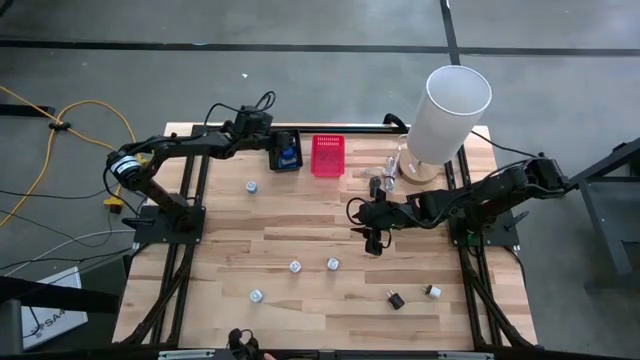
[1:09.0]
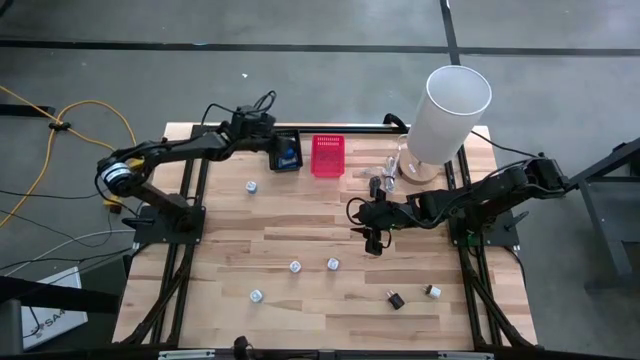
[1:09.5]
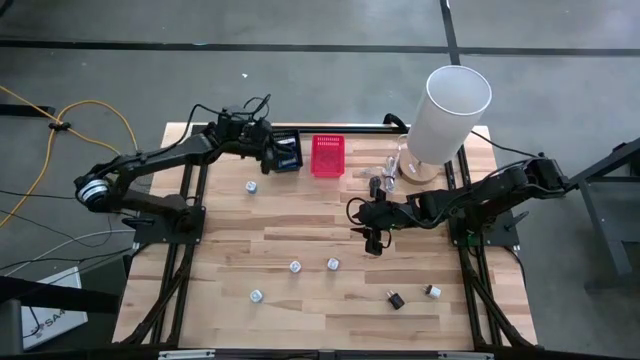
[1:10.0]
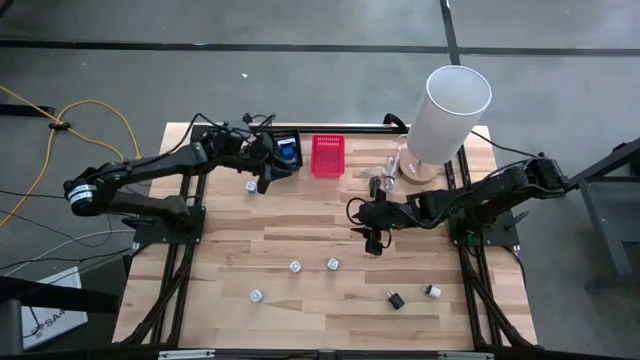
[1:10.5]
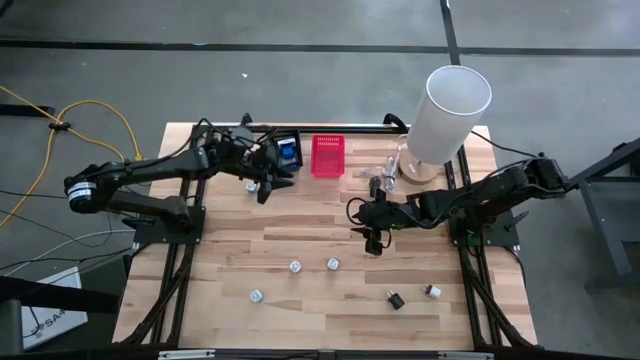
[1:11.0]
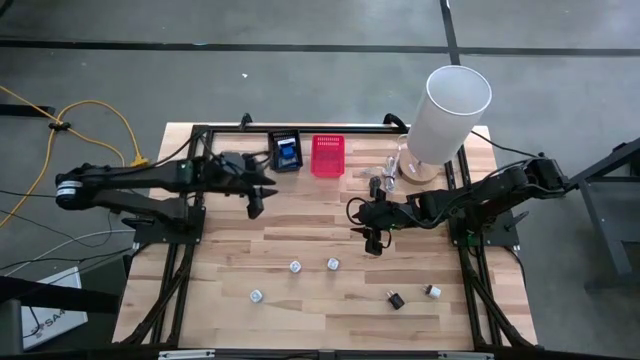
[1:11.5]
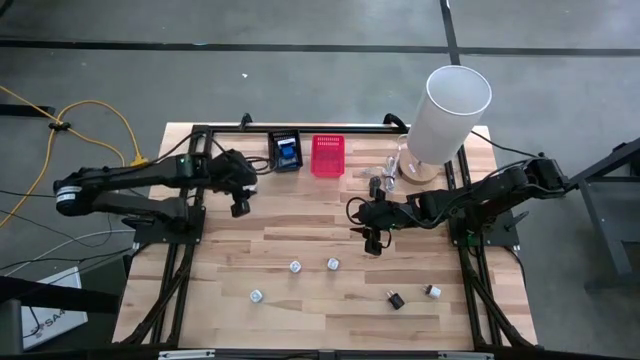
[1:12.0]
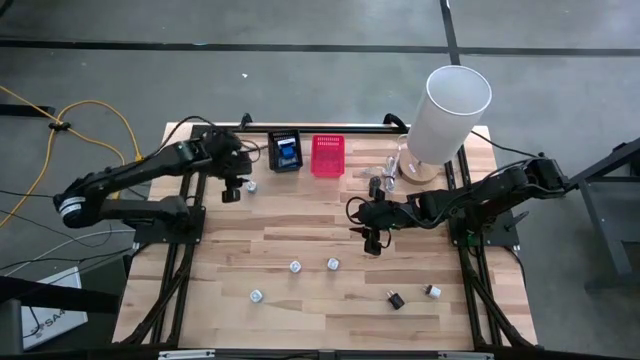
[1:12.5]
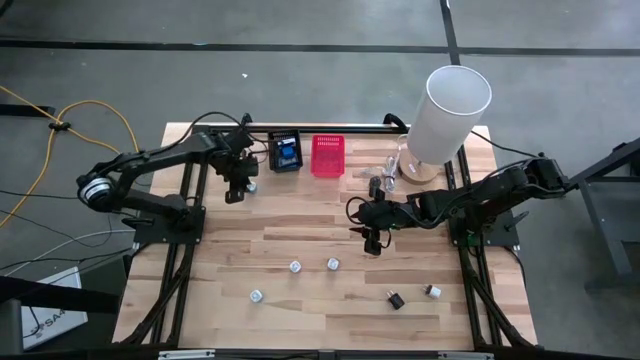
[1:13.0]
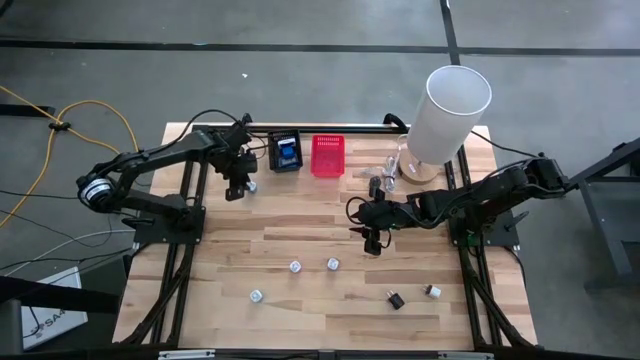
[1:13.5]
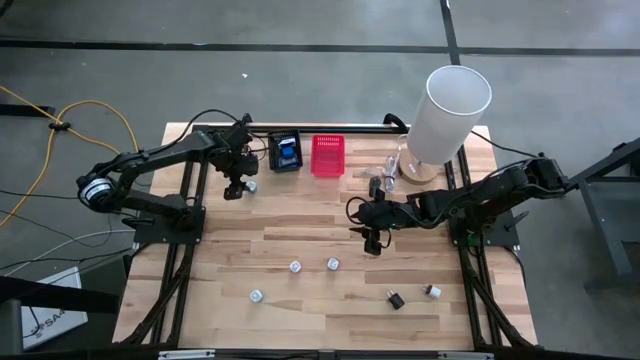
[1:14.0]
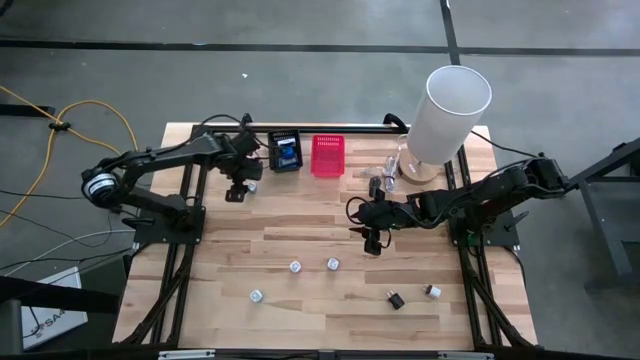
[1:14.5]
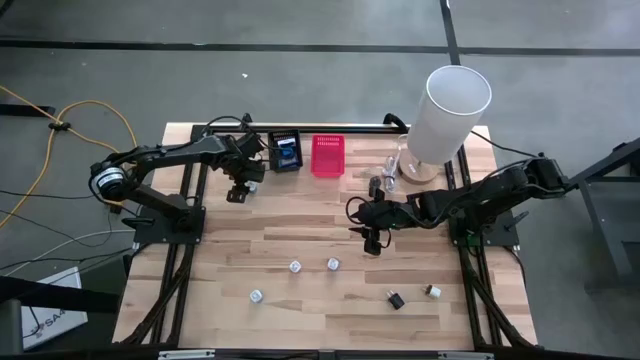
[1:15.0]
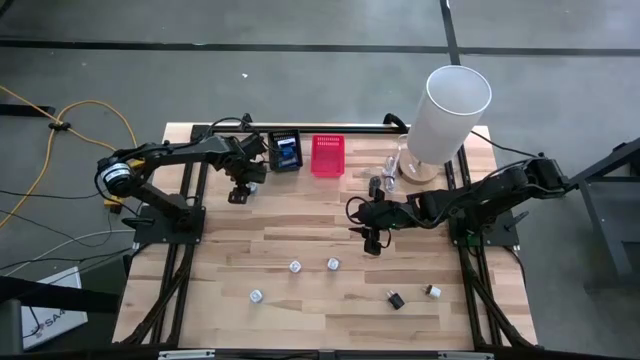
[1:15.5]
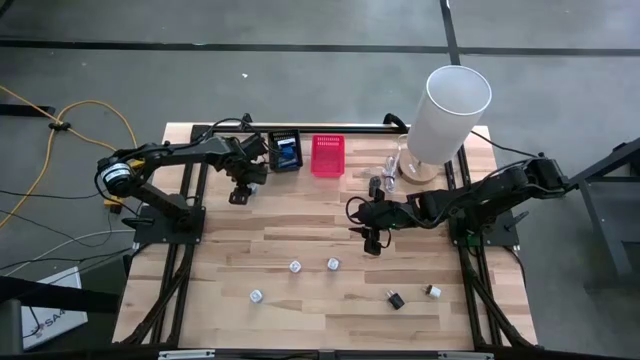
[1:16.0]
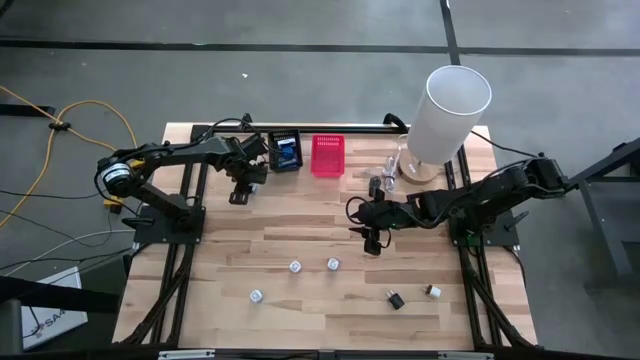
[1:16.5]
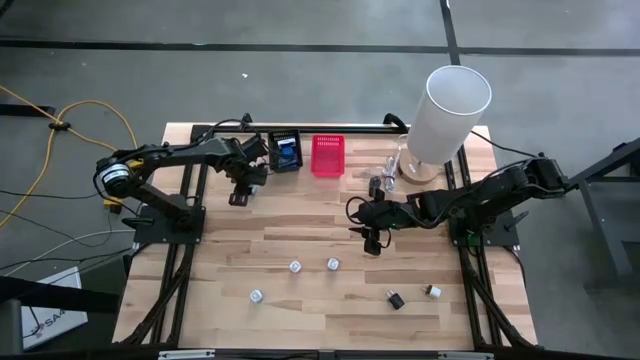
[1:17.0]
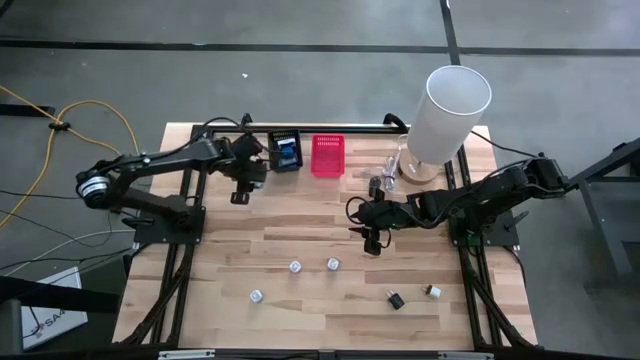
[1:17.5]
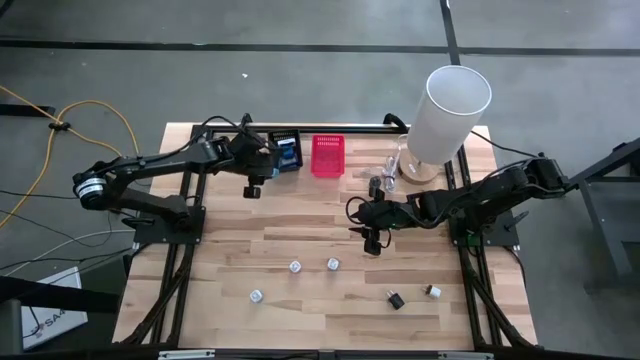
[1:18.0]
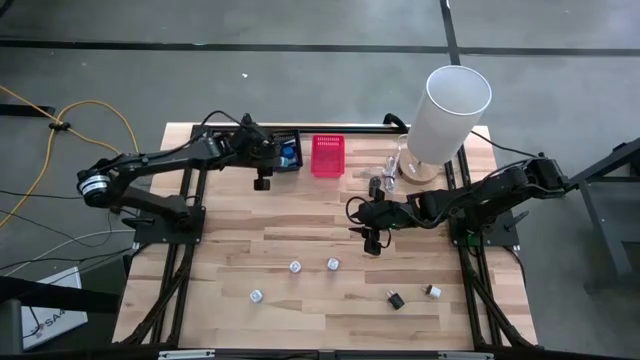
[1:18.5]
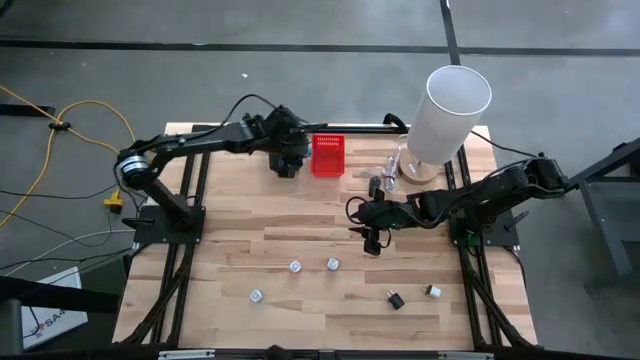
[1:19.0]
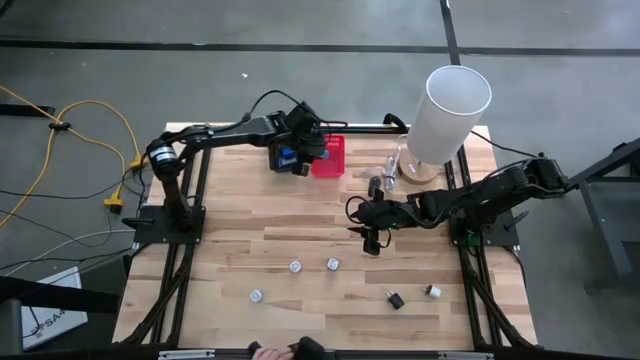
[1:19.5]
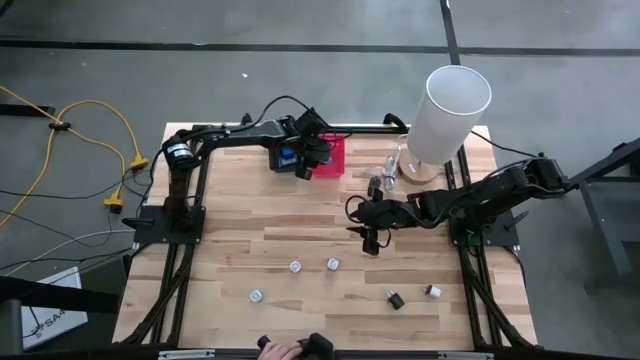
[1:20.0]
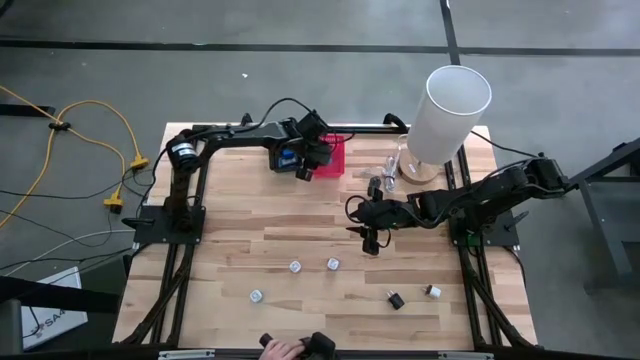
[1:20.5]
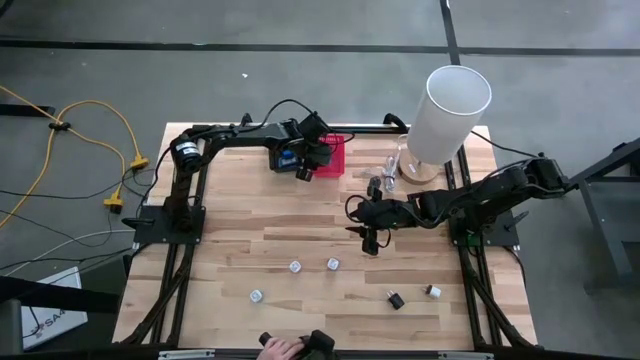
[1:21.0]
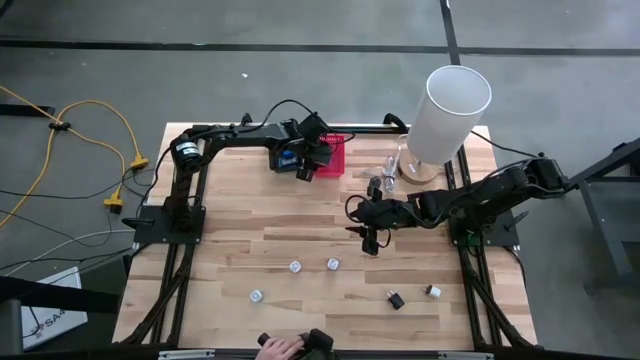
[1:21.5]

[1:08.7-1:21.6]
Task: Pick & Place Office items
Put the top blue charger adapter into the red basket

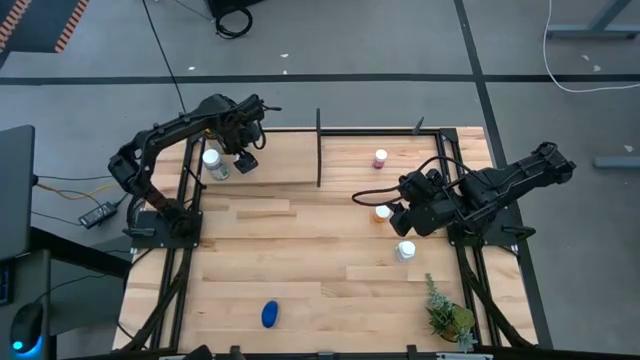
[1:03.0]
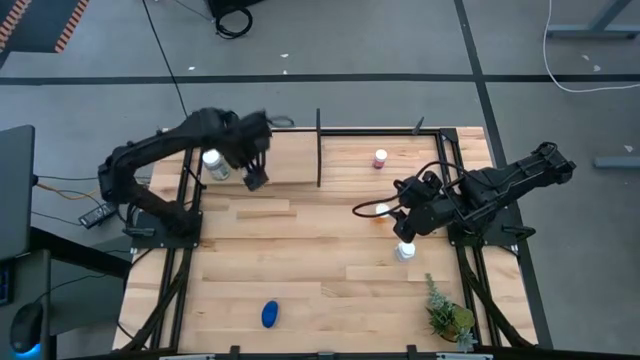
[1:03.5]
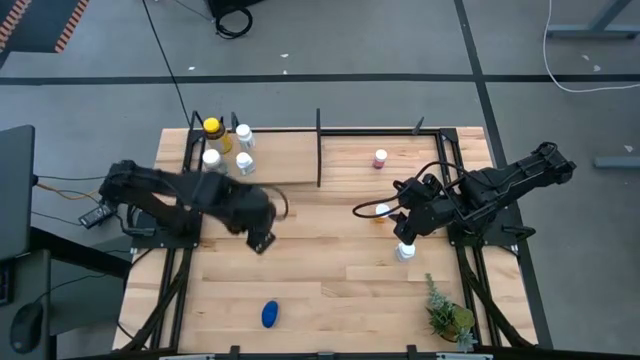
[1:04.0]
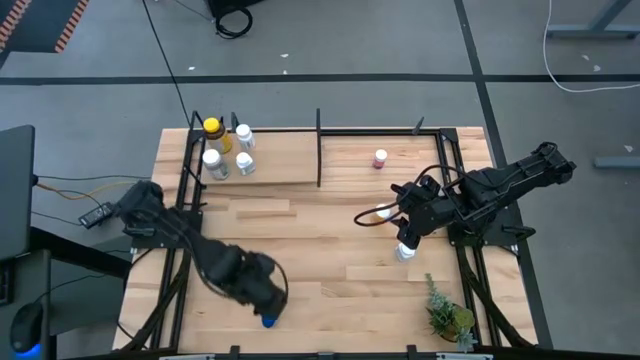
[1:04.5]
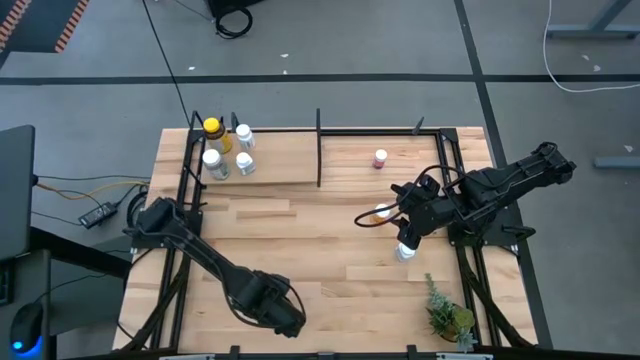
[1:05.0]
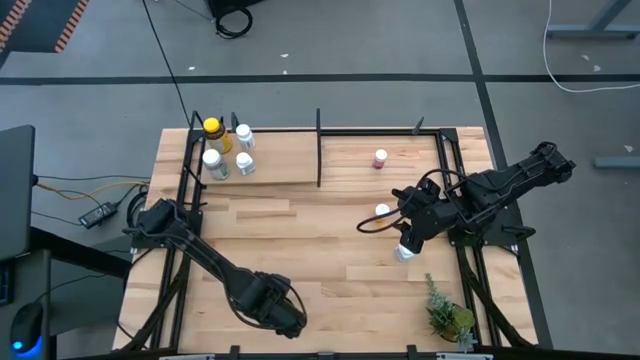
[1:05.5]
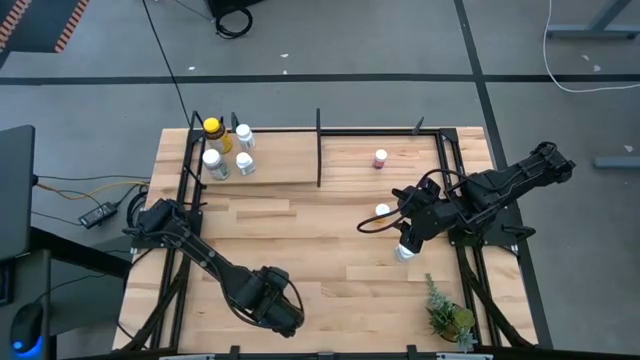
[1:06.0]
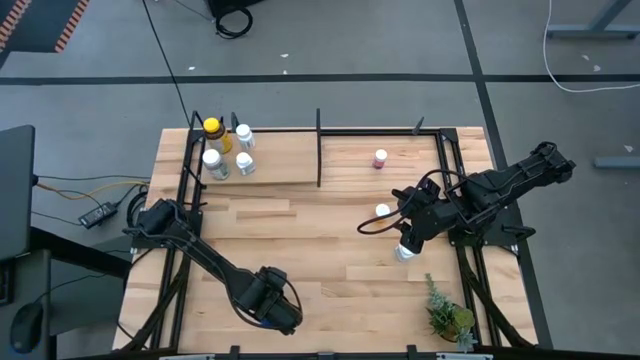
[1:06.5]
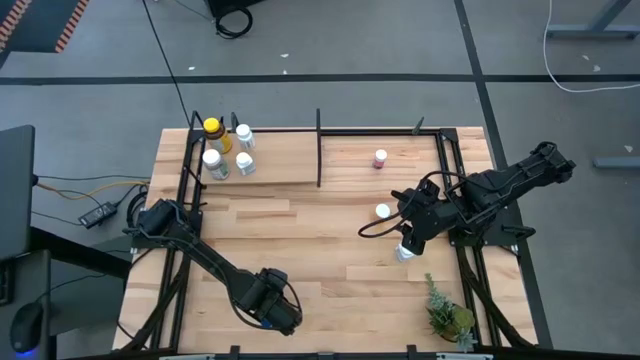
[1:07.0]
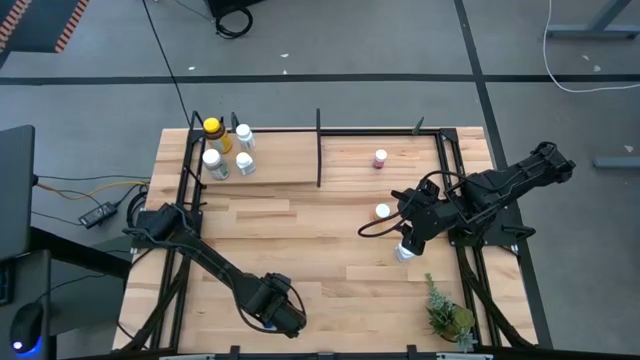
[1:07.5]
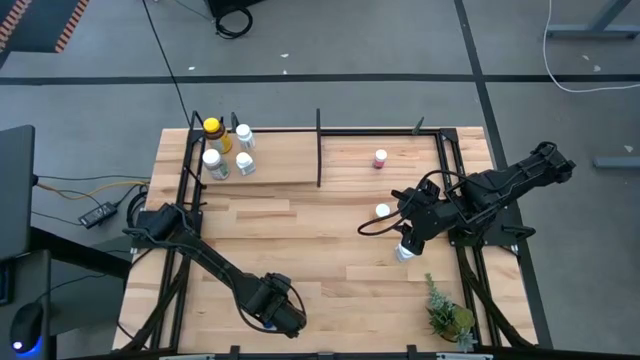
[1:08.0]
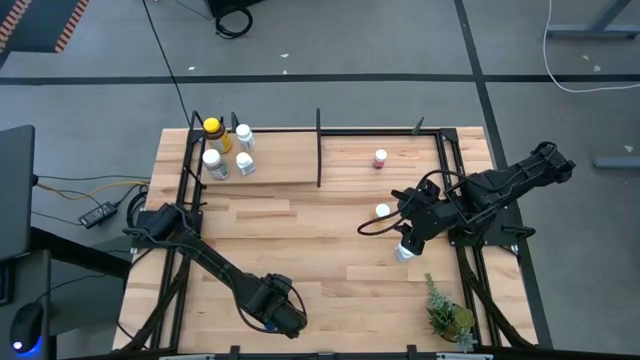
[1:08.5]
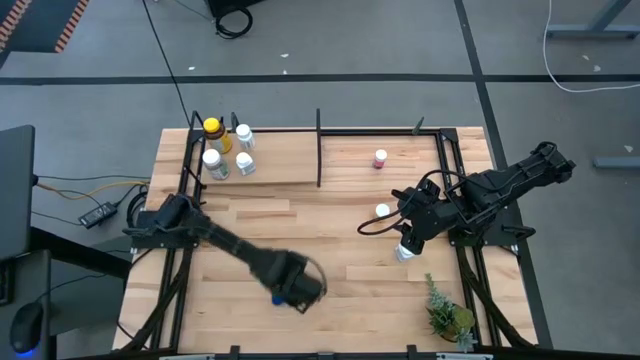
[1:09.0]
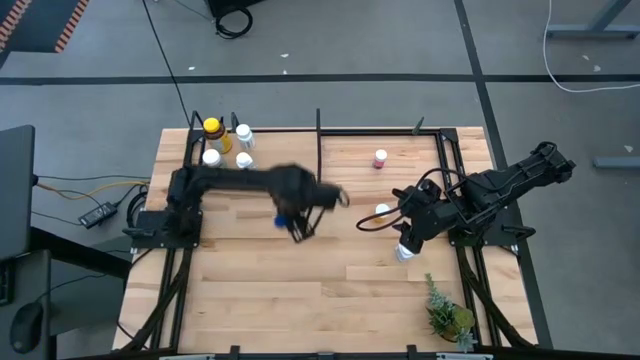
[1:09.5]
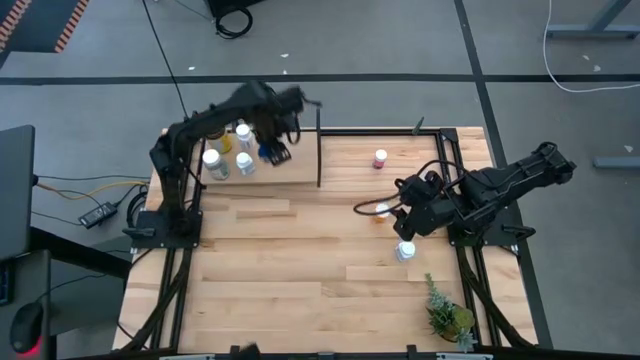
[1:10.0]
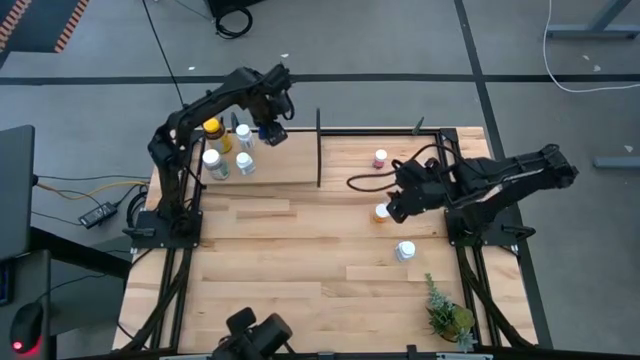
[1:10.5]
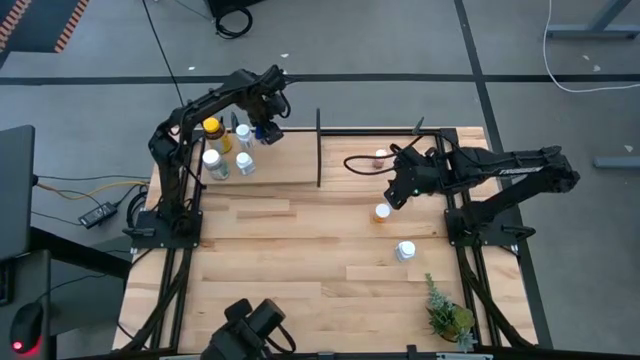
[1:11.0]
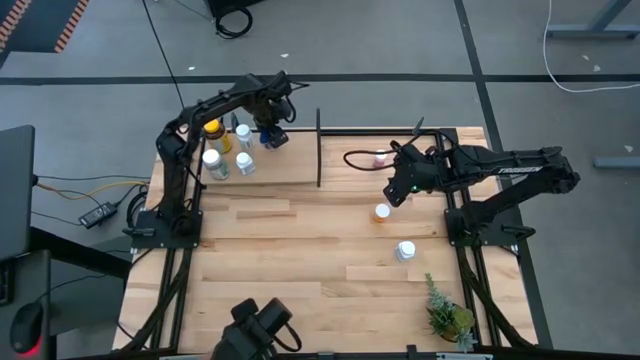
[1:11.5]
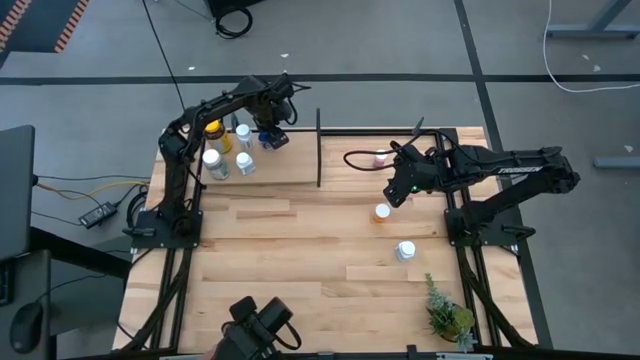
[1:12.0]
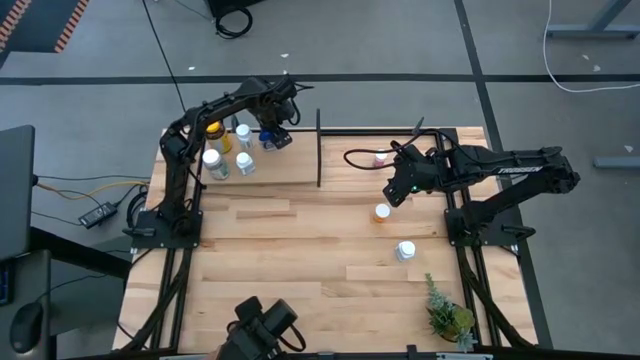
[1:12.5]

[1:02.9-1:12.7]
Task: Pick and place medicine bottles onto shelf by color
Put the blue medicine bottle on the shelf
